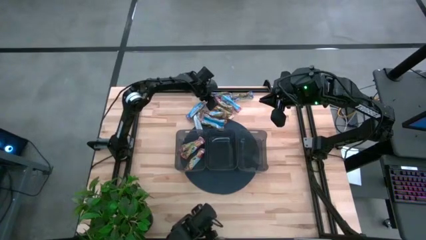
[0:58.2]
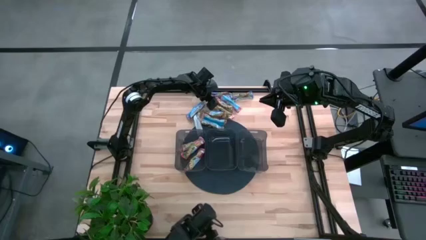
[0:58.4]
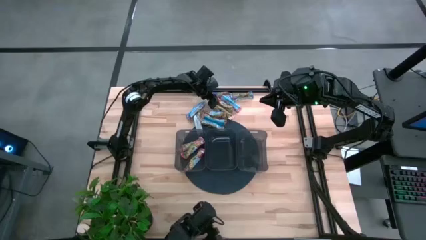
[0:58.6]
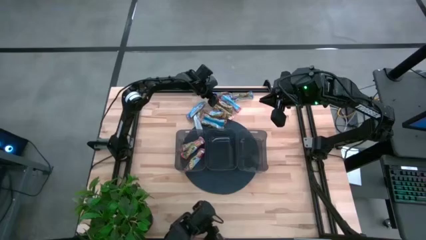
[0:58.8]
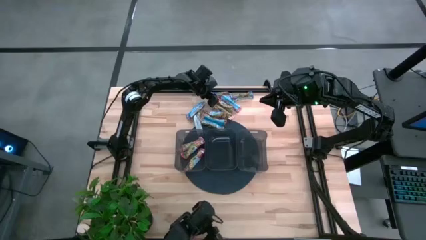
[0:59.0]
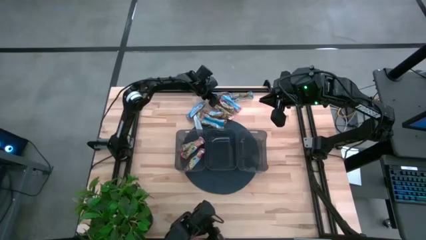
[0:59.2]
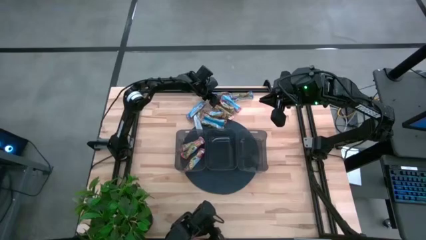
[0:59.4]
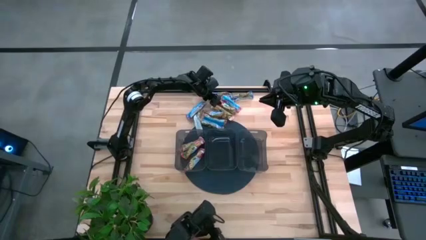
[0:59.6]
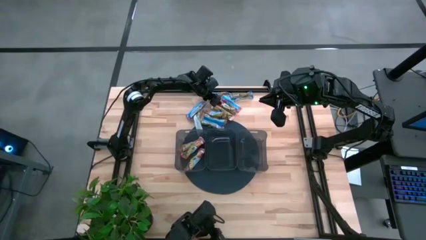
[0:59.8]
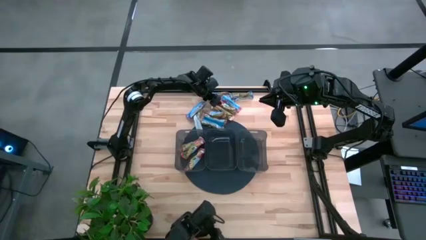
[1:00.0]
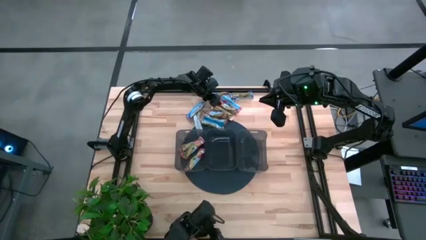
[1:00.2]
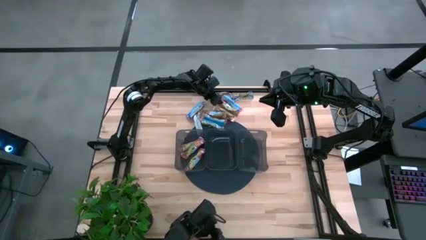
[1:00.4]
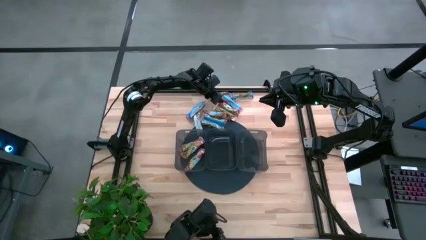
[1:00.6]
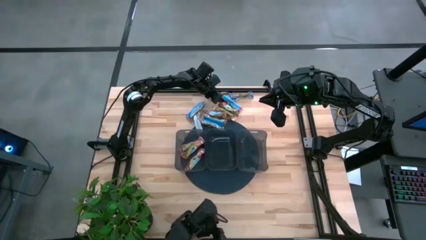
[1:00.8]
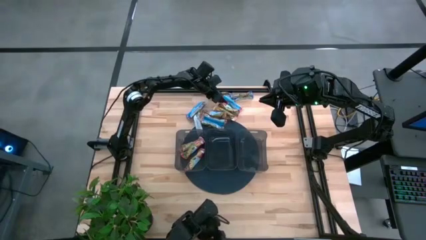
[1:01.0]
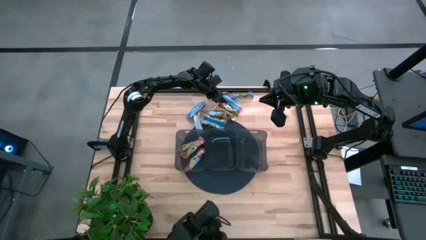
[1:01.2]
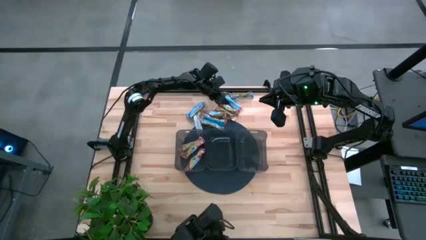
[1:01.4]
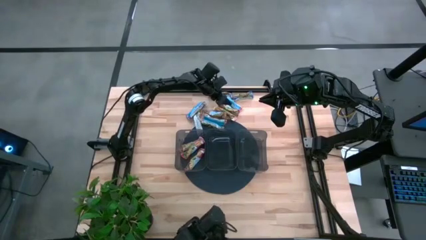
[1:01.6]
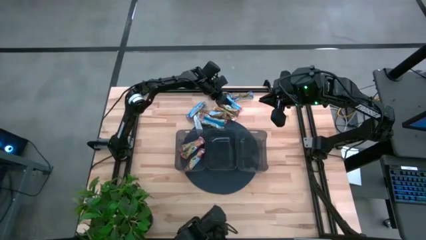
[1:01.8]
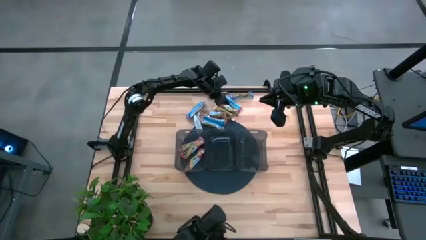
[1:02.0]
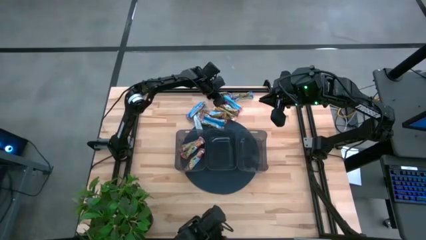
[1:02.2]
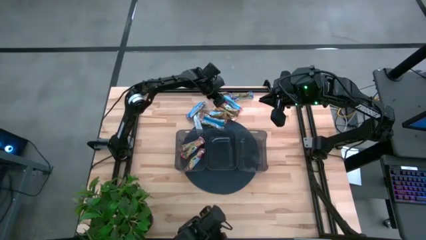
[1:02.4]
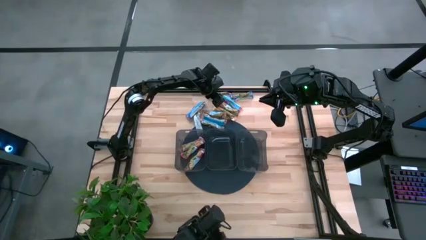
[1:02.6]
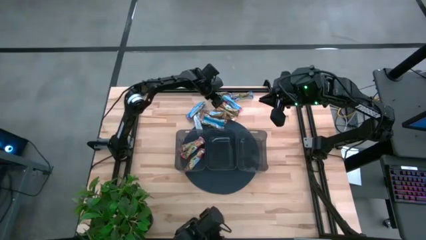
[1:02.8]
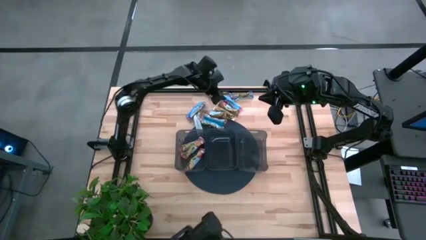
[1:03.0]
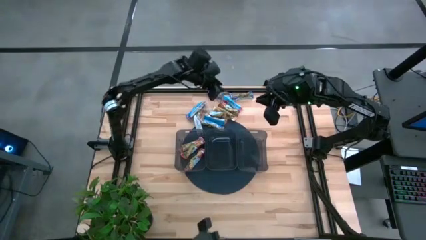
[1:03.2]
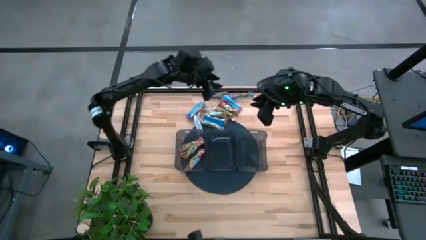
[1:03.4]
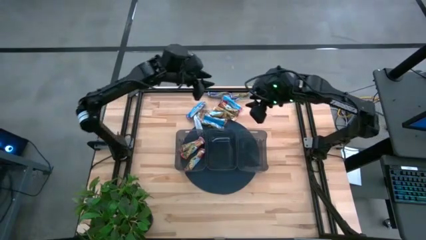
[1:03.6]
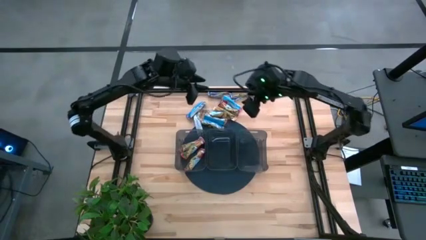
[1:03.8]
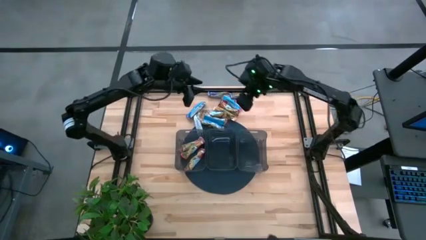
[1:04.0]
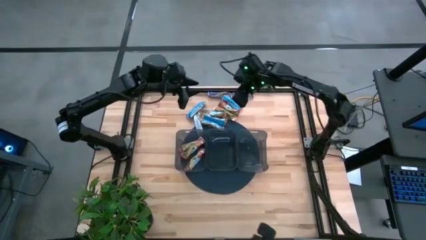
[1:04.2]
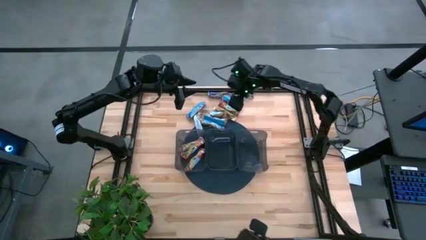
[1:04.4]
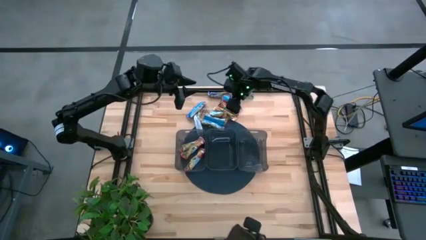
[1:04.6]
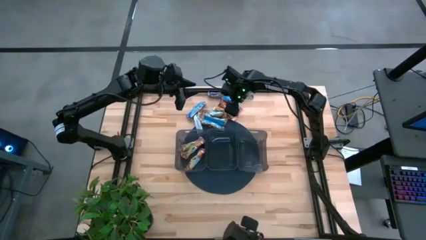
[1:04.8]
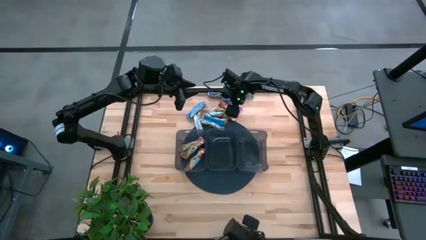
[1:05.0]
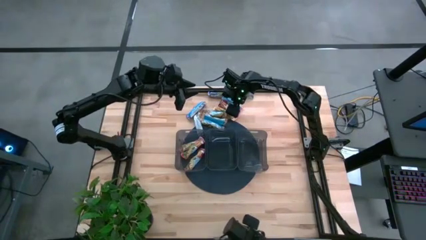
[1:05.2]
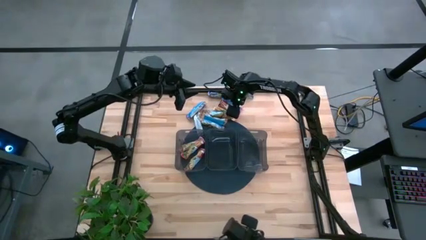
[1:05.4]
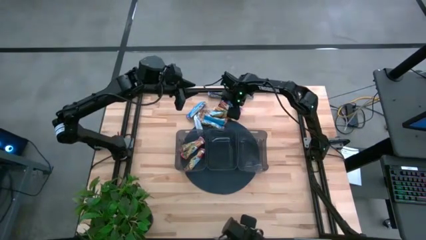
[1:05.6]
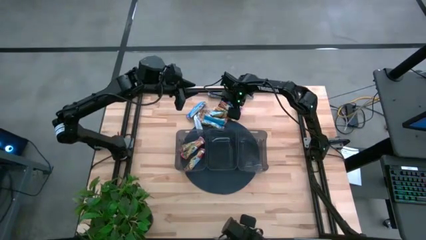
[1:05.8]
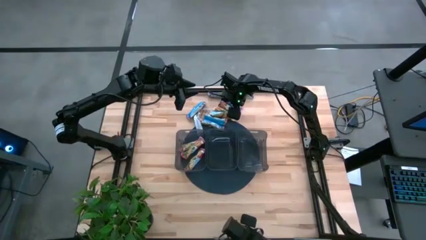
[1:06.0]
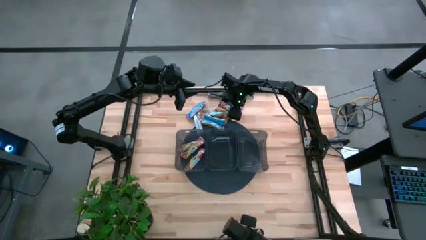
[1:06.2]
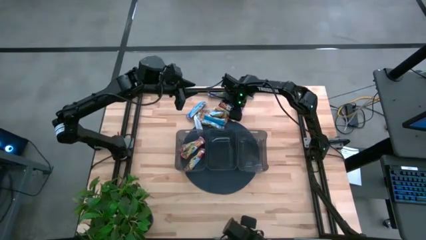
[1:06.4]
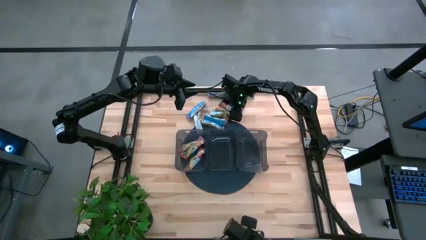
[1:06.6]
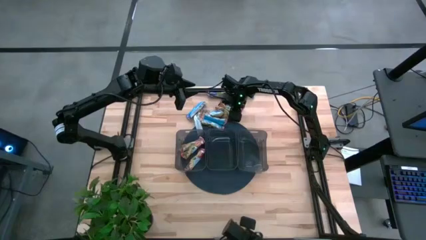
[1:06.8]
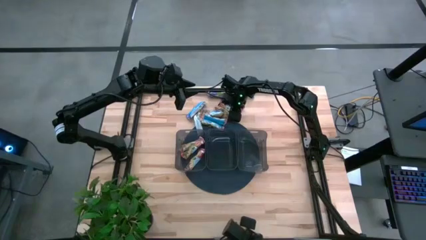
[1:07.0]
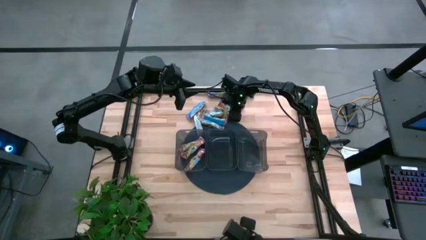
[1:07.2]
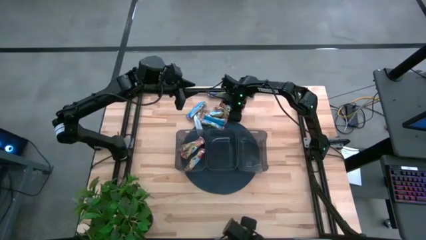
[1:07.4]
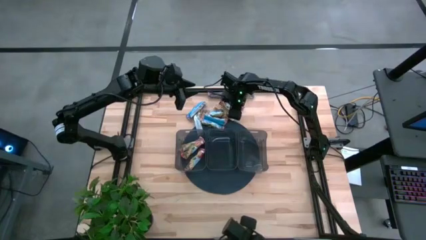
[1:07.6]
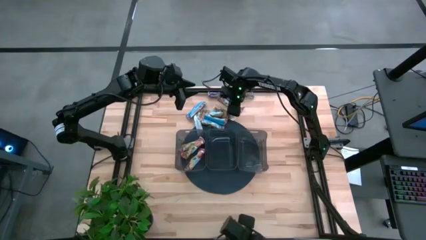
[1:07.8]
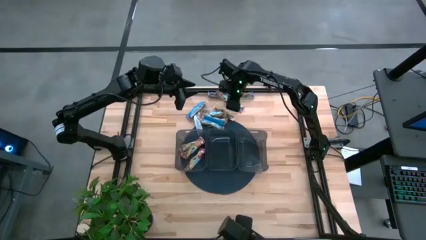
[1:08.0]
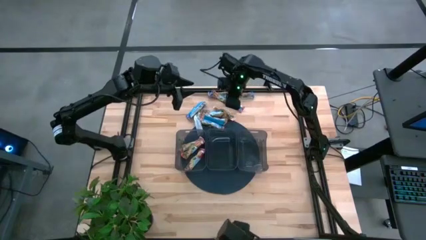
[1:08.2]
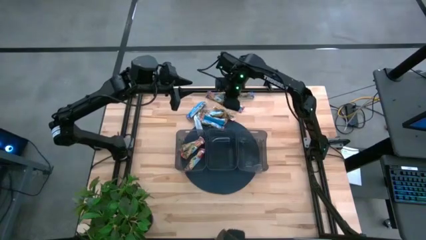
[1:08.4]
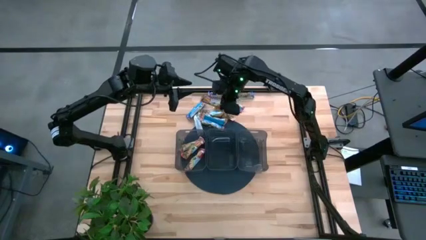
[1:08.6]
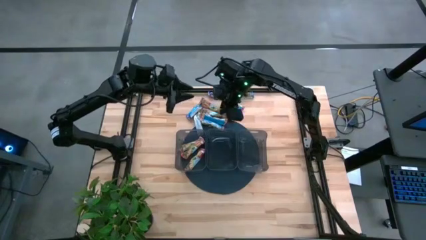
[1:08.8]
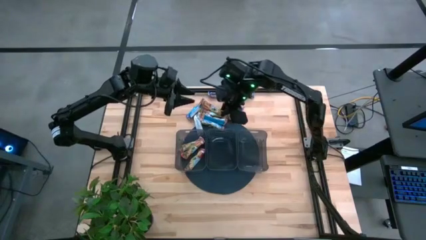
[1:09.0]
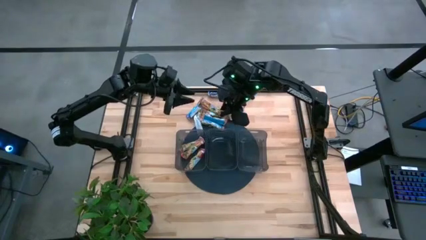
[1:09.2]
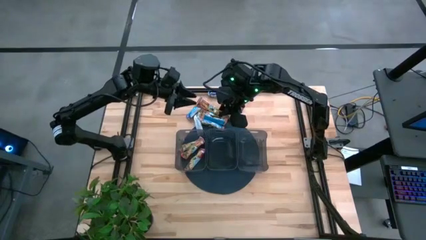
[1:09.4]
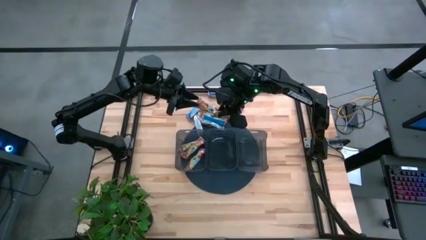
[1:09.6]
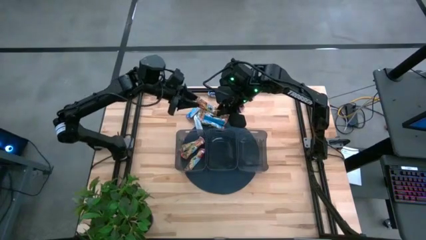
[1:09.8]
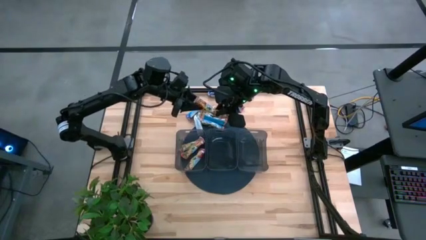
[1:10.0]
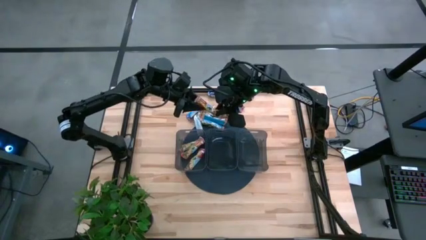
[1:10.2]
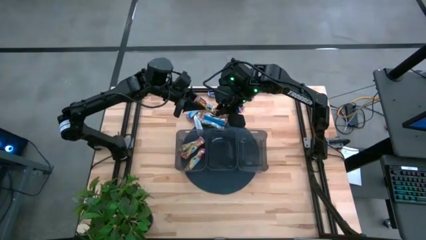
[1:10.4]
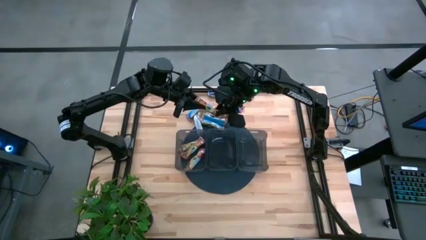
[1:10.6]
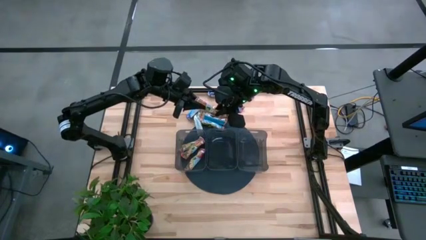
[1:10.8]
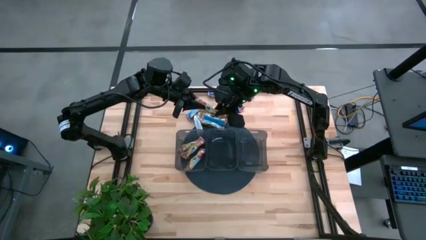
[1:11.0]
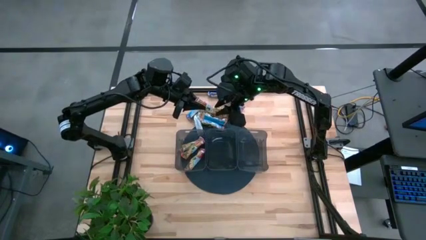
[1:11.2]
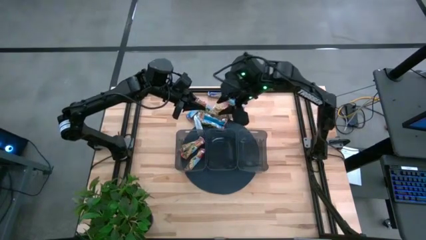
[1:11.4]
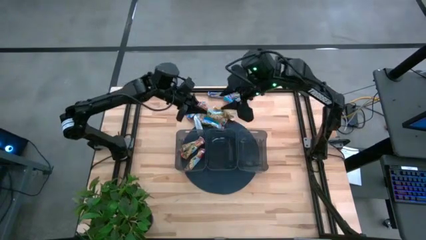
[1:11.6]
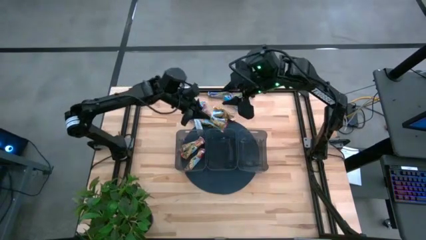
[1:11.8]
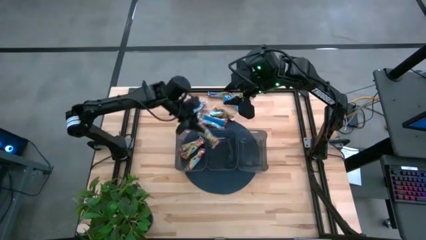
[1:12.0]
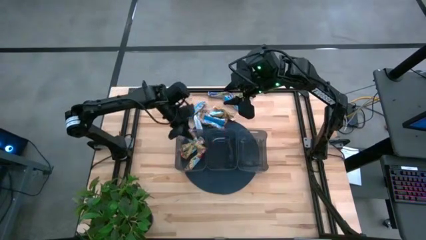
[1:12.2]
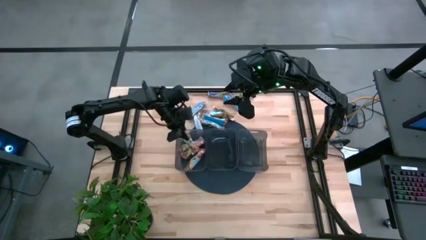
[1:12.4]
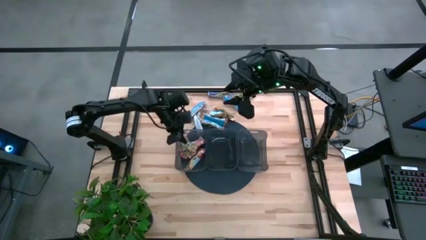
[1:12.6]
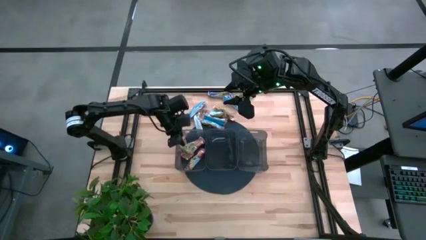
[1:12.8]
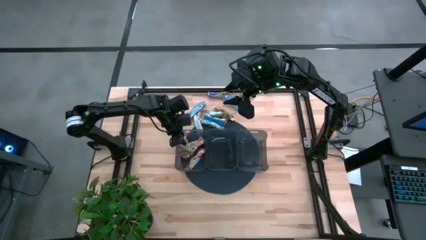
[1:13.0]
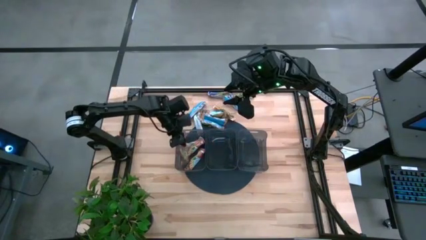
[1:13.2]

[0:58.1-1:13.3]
Task: Pick and place Granola Bars by type
Put the red granola bar into the left black bin
